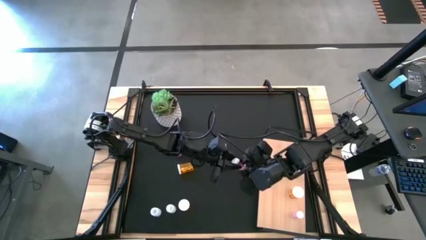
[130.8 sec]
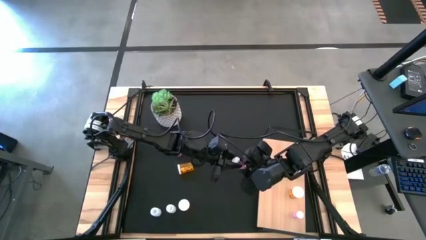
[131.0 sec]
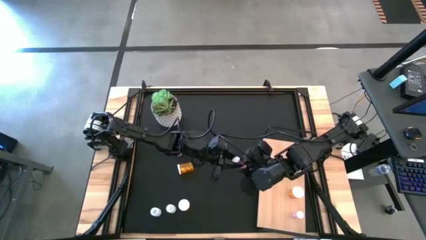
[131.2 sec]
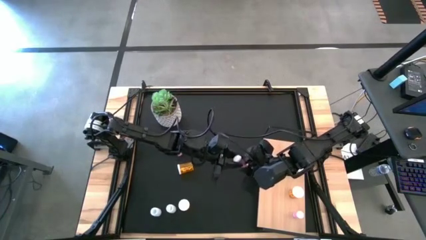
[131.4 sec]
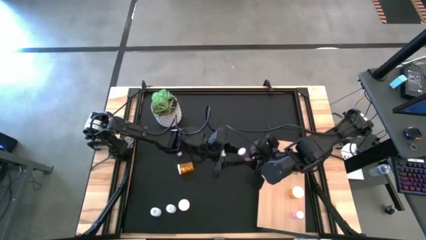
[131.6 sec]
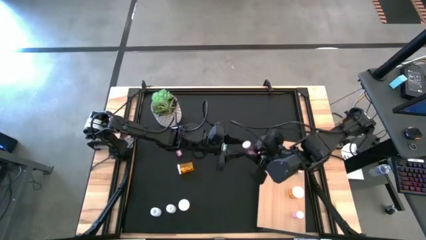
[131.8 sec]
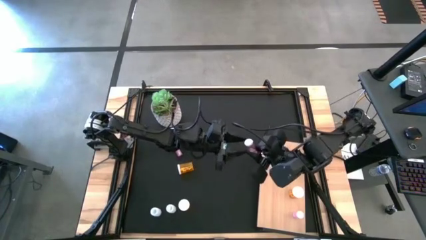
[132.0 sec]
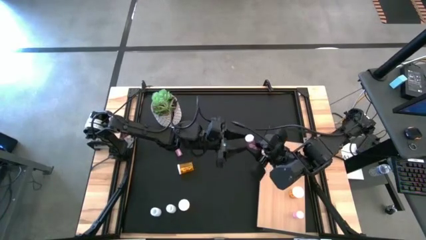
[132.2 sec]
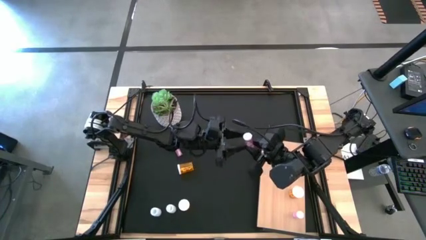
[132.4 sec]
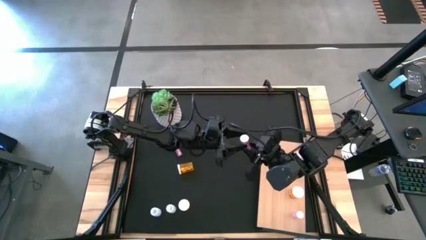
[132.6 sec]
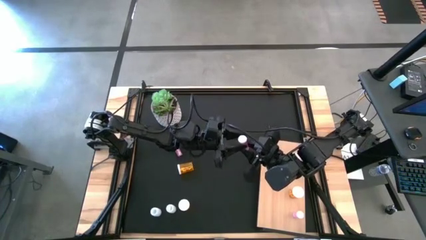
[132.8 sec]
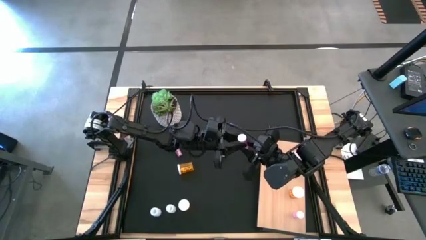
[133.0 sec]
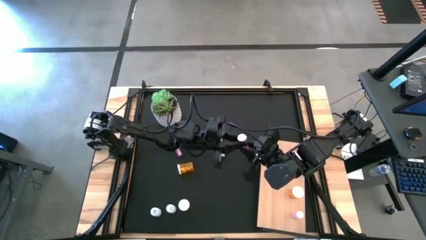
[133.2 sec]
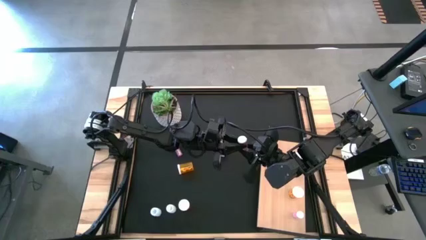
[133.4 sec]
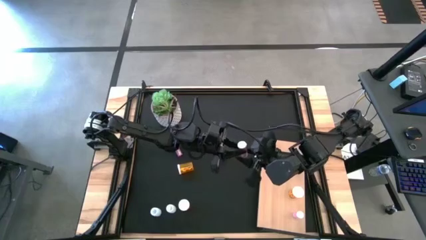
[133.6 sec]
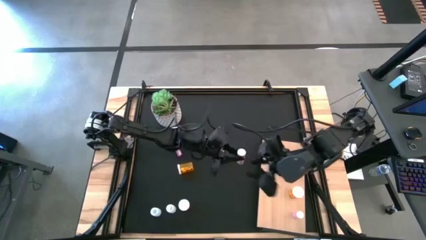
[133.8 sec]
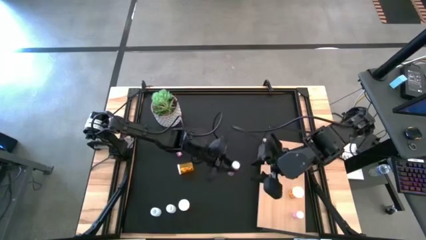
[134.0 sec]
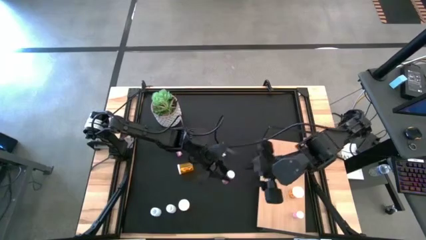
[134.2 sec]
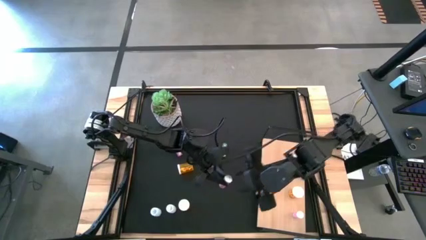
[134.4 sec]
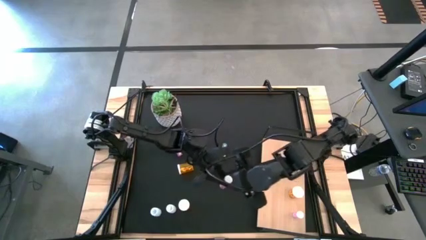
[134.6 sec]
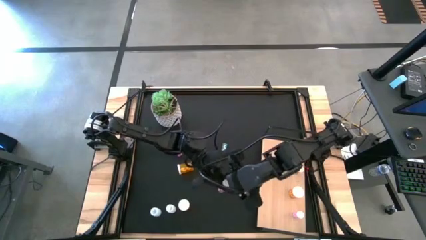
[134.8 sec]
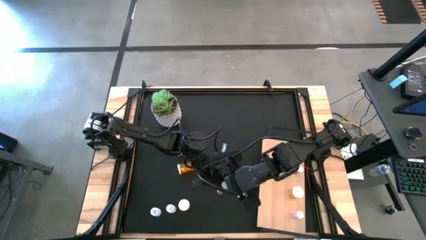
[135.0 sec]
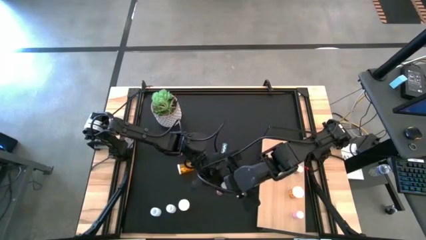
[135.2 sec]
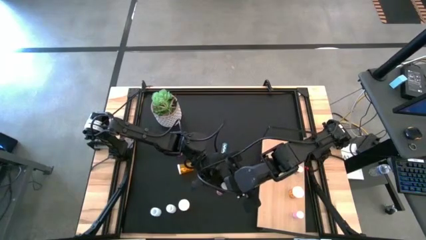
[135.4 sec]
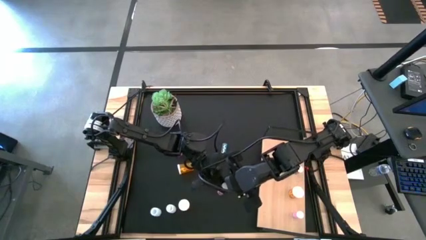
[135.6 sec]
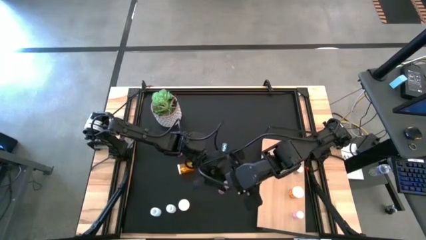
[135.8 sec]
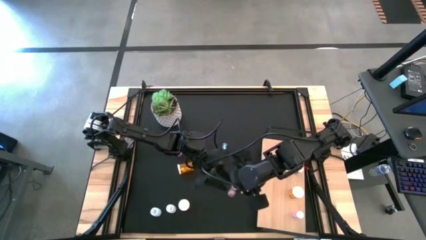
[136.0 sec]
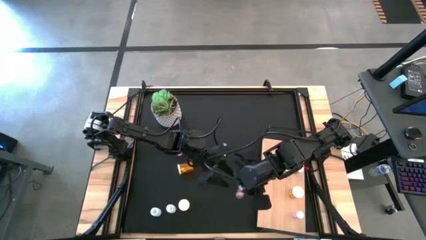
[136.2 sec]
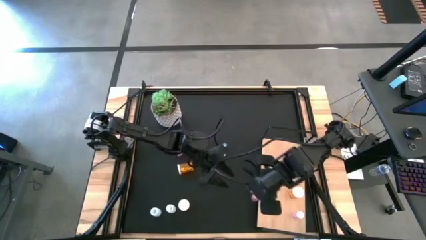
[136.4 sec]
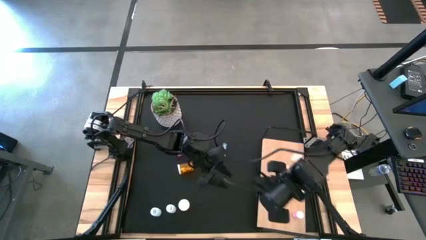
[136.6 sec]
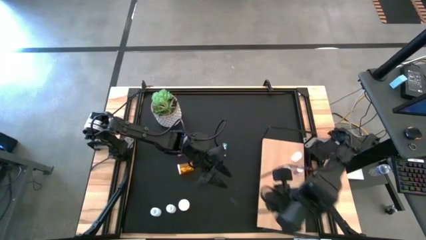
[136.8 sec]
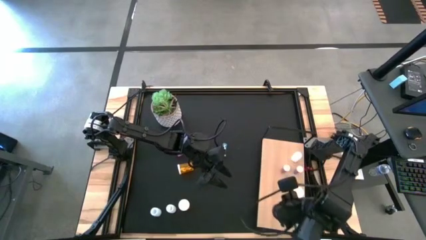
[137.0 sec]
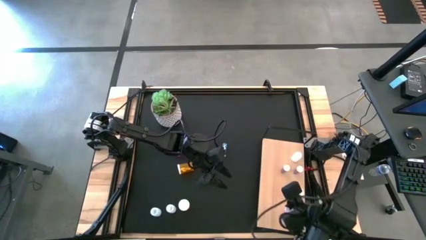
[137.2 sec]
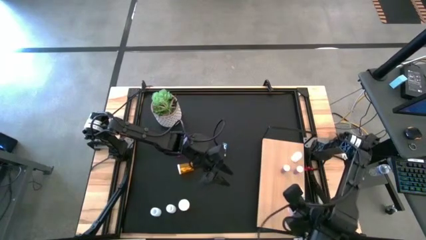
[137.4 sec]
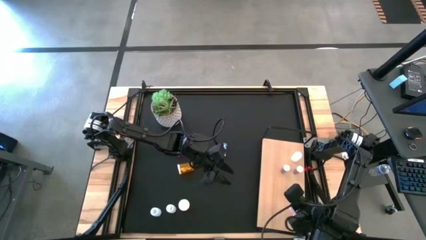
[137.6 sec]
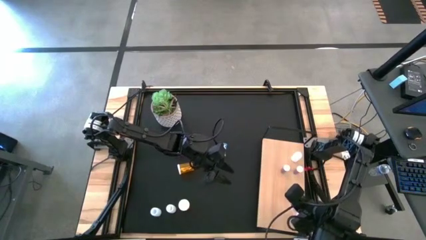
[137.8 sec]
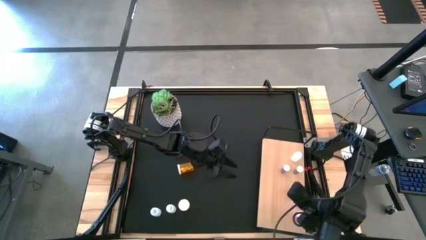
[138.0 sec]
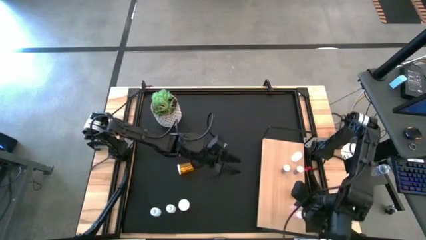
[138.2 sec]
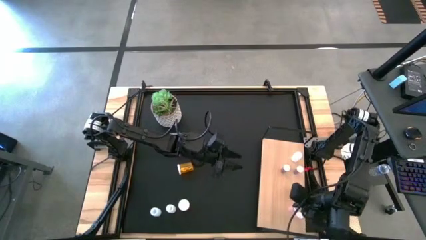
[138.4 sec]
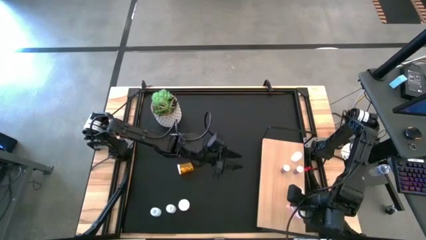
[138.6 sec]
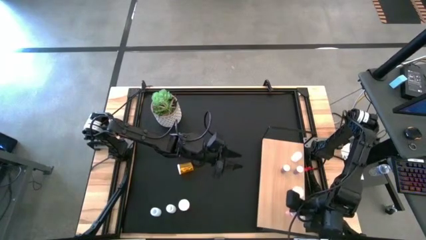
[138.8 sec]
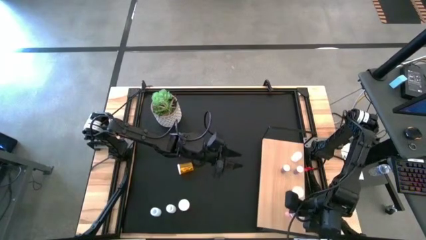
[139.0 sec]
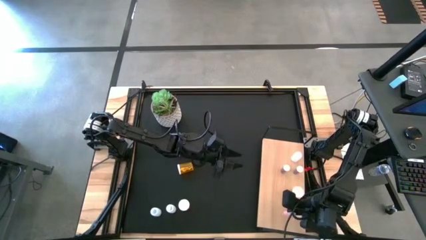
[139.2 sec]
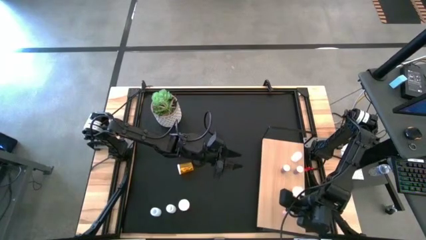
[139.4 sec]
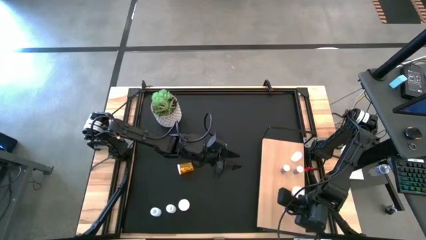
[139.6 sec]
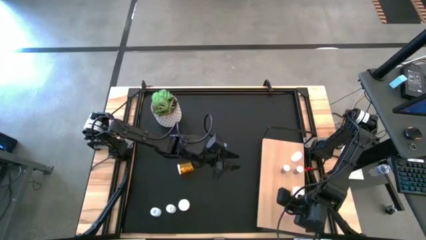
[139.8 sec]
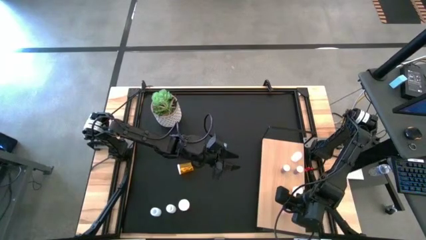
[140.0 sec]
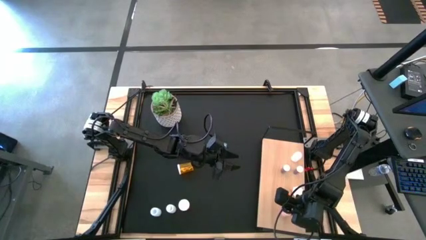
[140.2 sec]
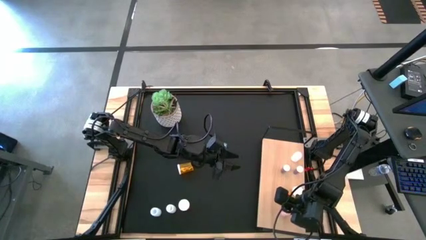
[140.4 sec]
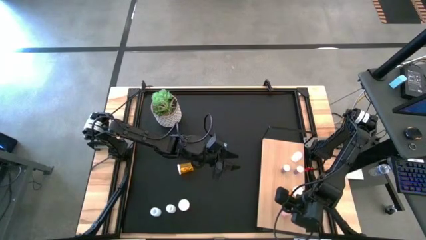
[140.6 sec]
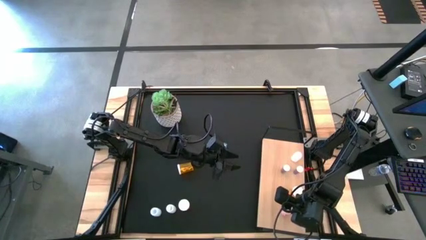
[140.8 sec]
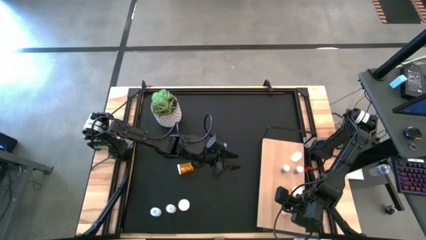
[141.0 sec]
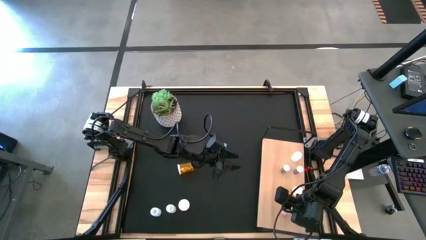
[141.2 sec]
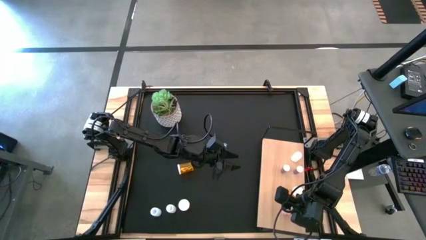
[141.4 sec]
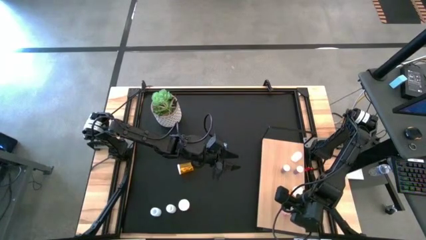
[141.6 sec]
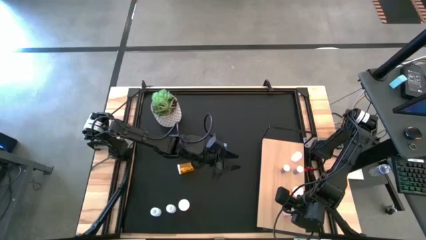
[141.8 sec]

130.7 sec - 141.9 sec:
Task: Pick and place medicine bottles onto shelf by color
Put the left pink pill bottle on the shelf aligned with the other pink pill bottle

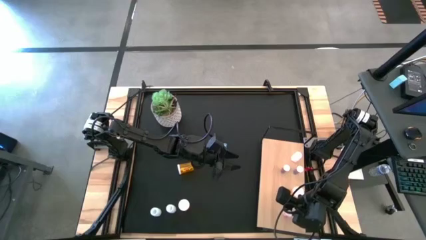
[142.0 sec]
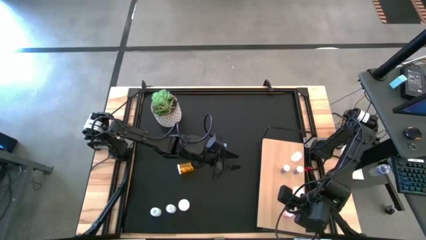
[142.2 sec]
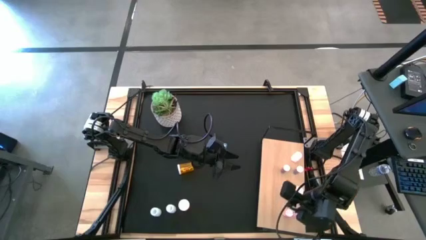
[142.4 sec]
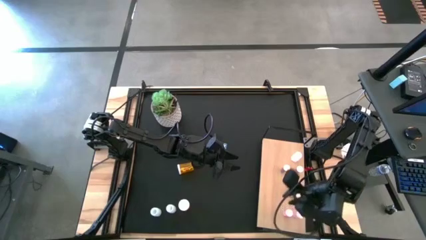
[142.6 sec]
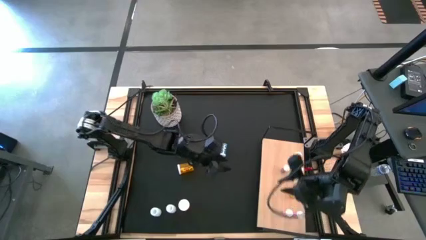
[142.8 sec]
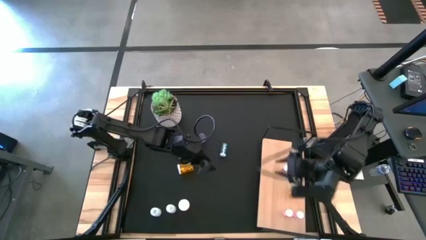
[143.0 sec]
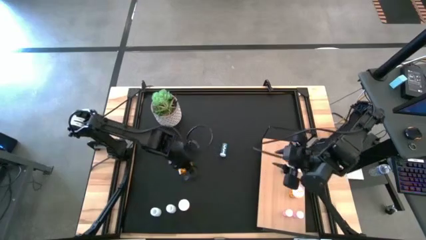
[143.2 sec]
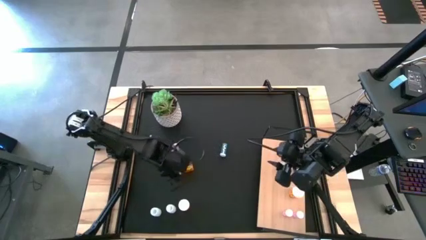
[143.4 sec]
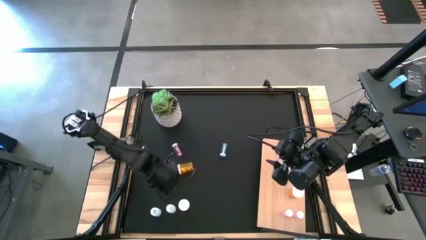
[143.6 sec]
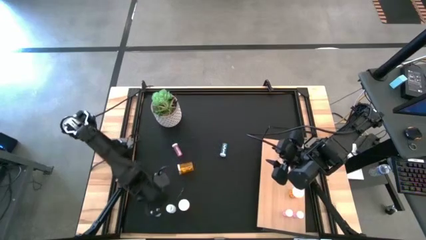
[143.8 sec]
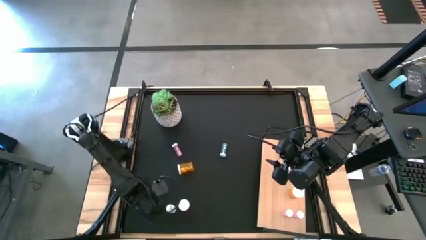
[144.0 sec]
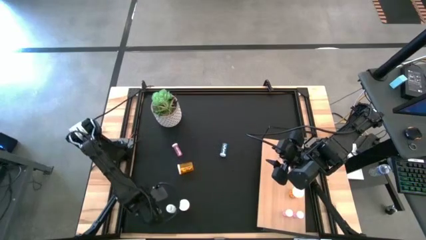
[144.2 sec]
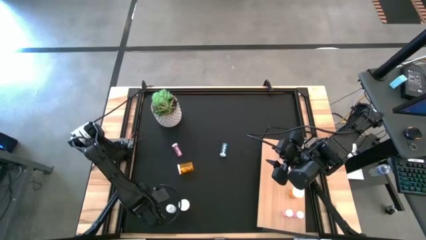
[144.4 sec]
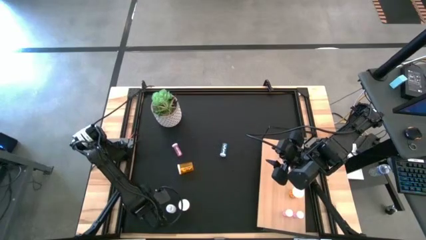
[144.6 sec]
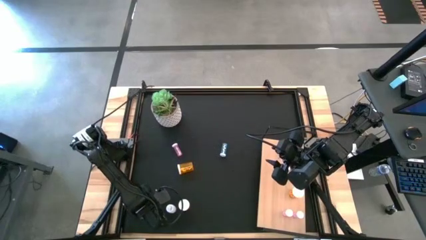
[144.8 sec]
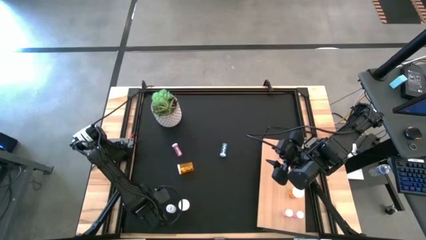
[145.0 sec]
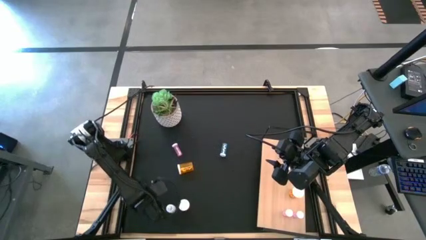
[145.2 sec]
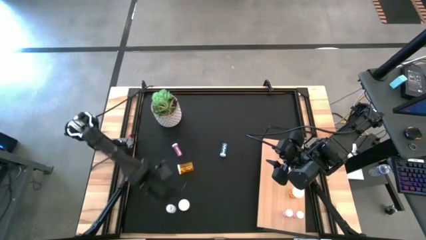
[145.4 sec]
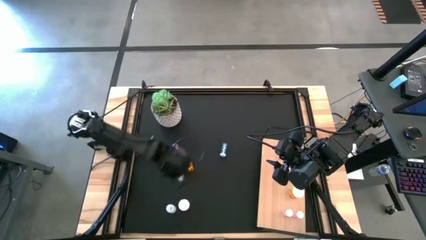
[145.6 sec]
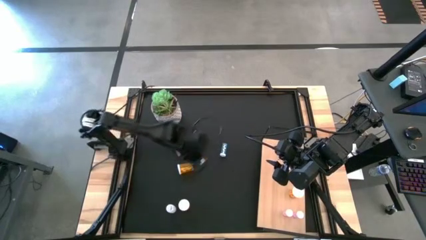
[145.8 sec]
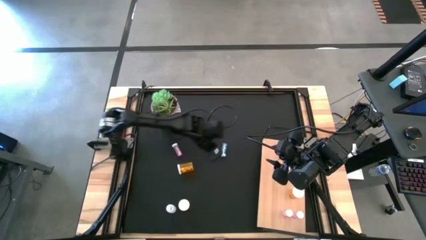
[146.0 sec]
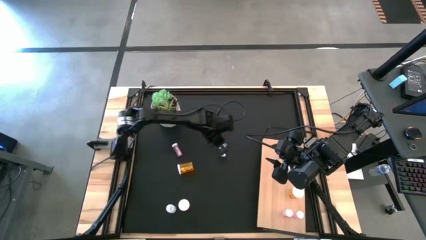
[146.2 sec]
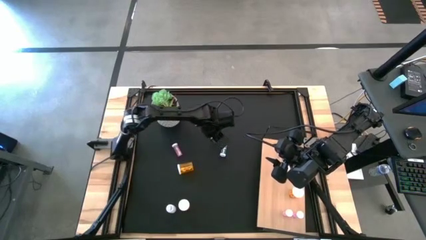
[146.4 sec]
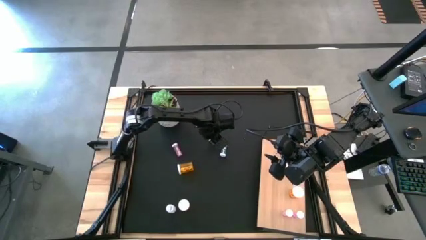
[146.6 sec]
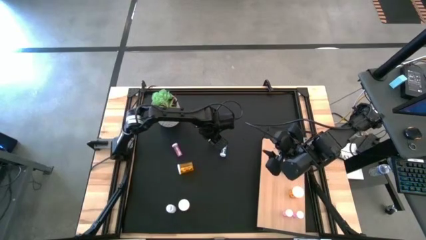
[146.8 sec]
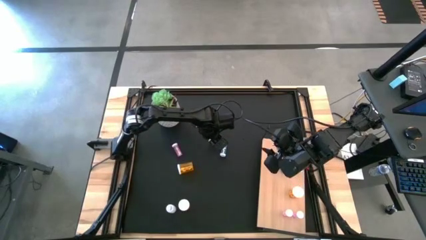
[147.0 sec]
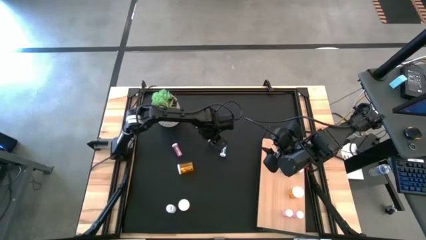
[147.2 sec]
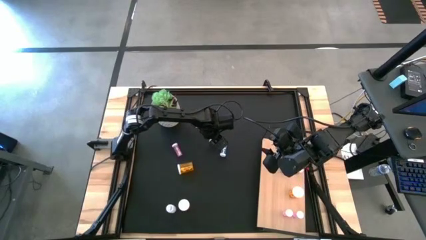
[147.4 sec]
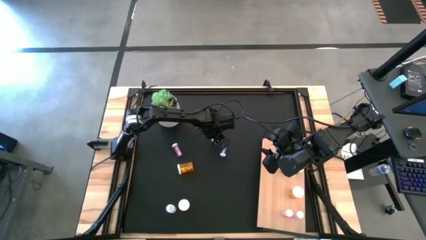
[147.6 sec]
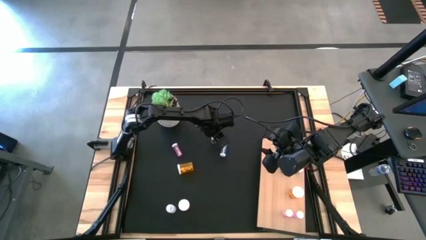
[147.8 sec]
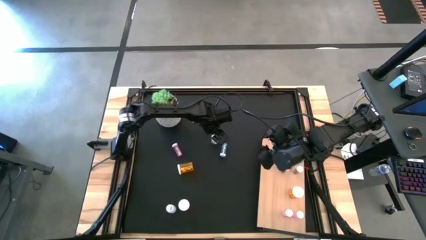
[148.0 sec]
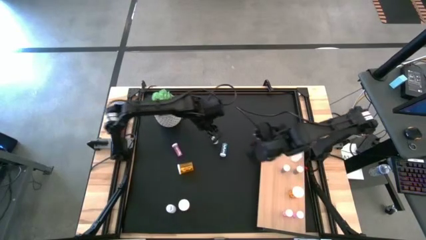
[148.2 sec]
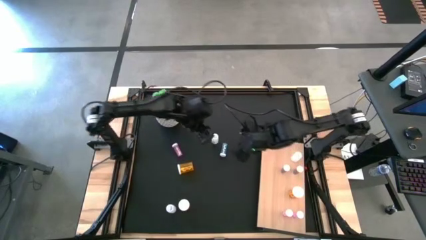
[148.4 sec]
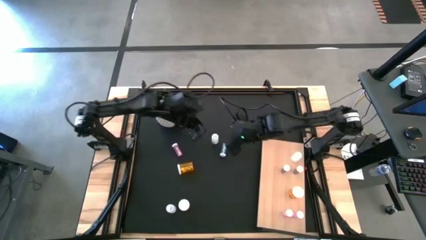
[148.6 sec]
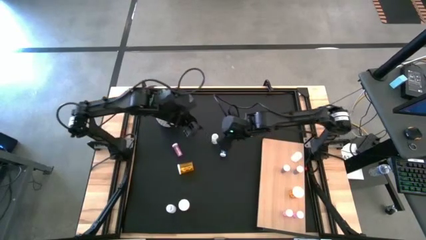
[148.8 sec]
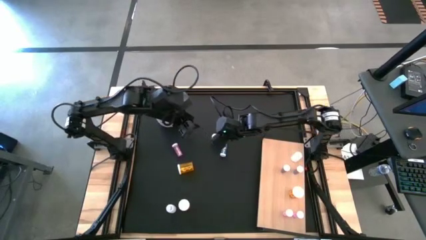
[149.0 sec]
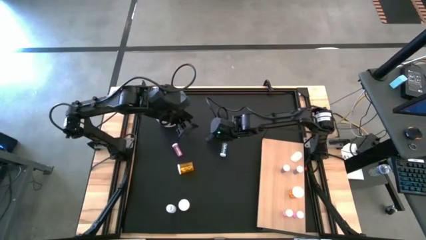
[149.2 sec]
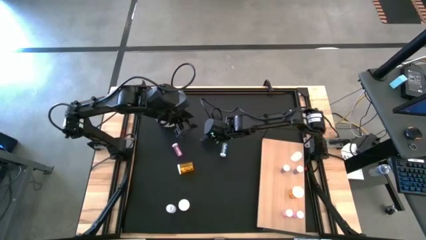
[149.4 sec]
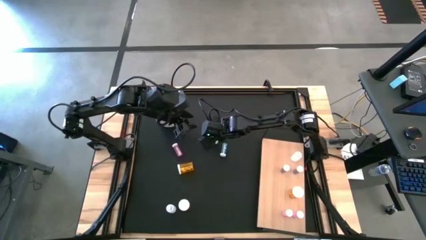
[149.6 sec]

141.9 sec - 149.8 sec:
Put the left white pill bottle on the shelf aligned with the other white pill bottle
